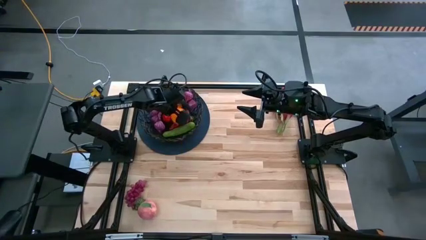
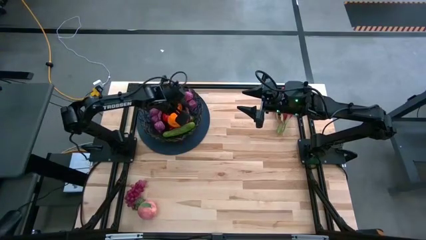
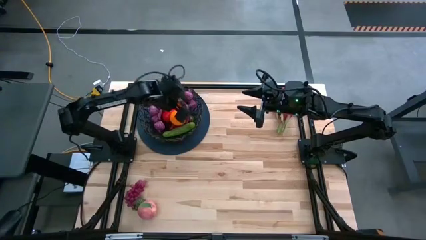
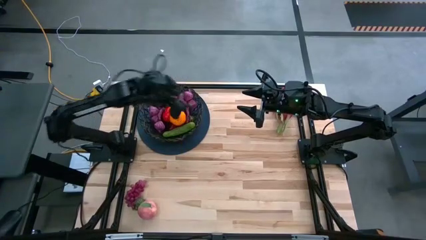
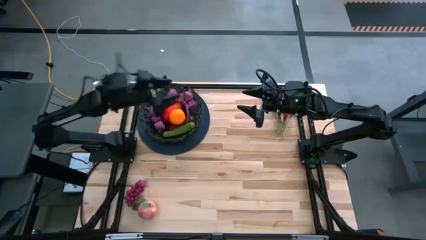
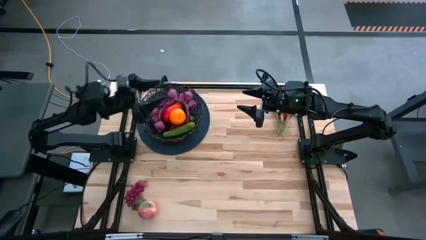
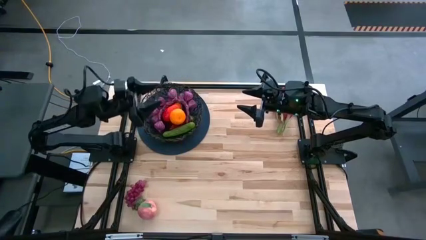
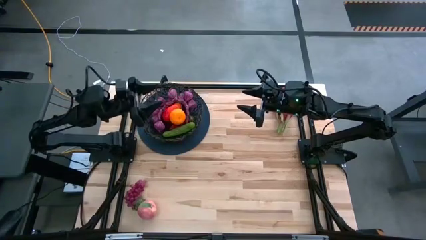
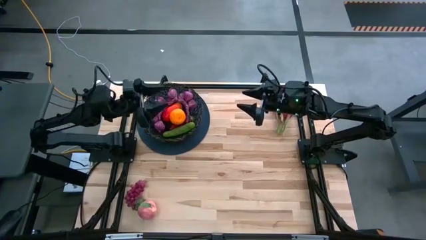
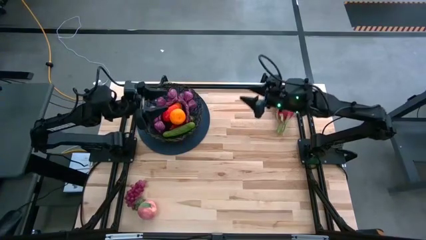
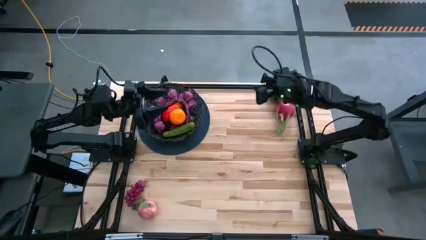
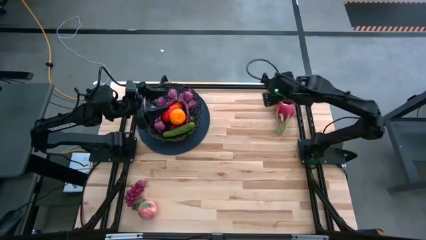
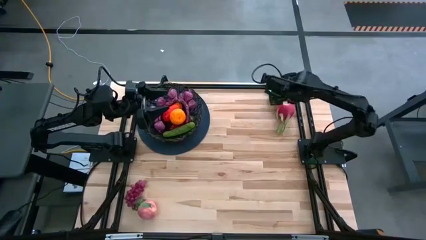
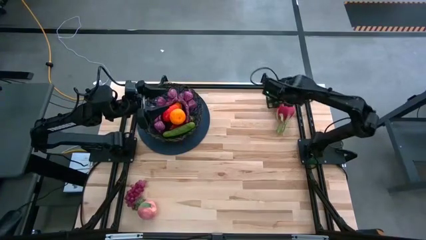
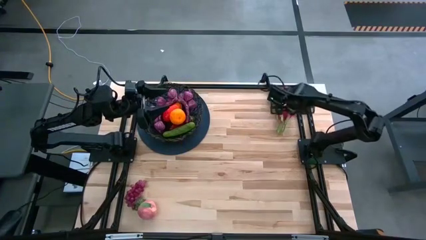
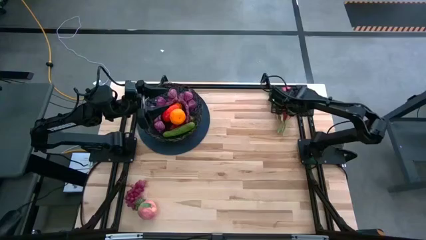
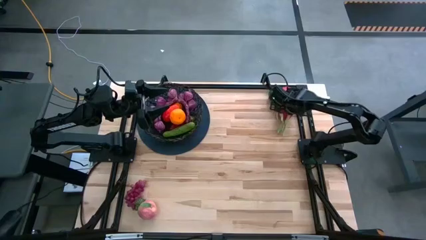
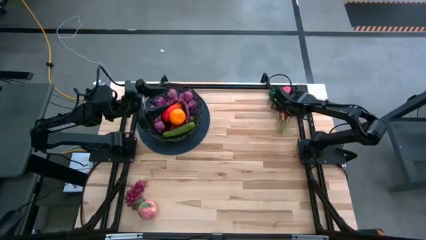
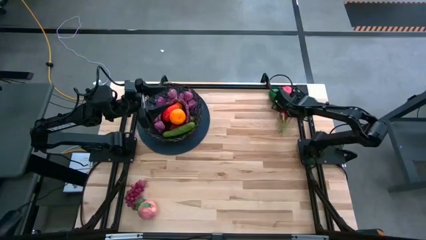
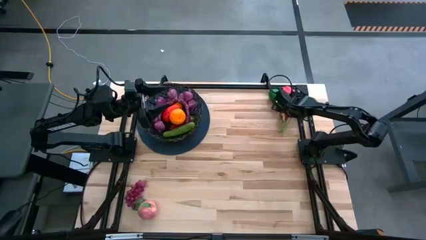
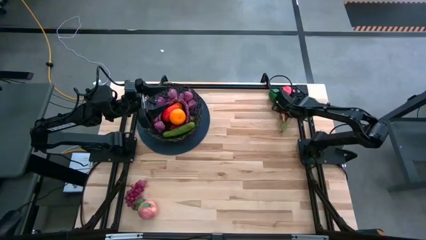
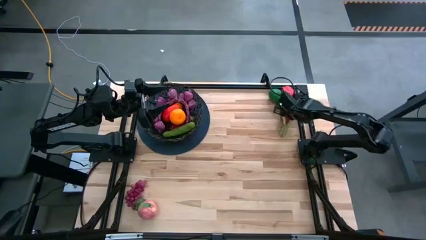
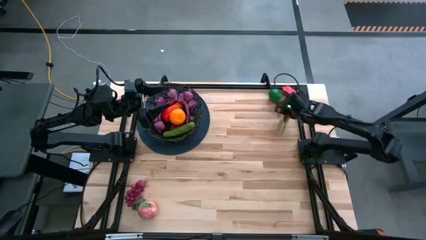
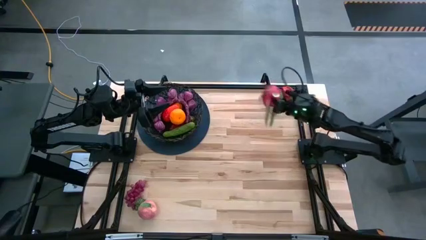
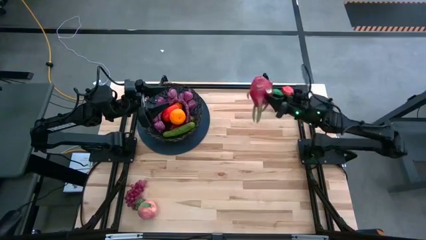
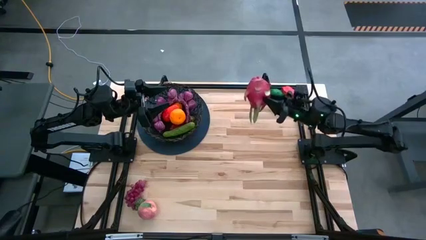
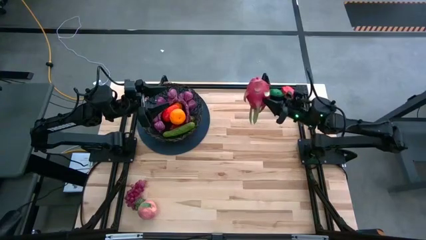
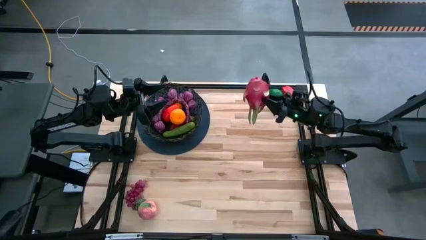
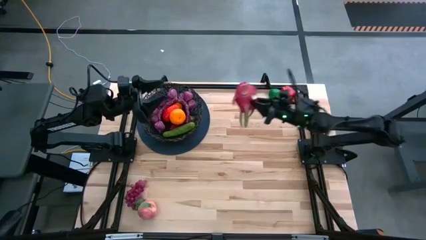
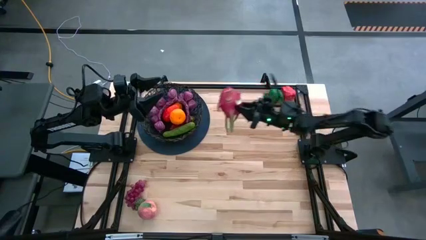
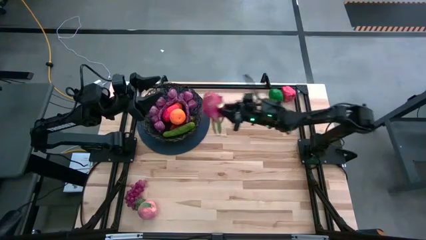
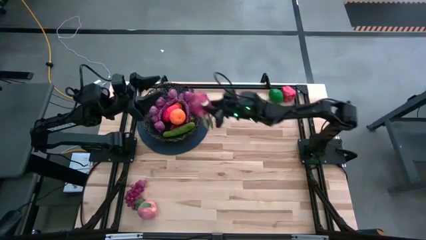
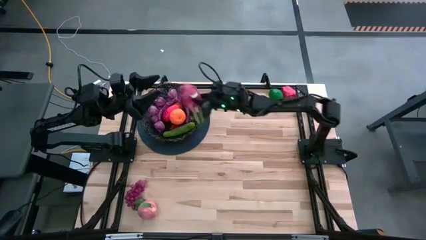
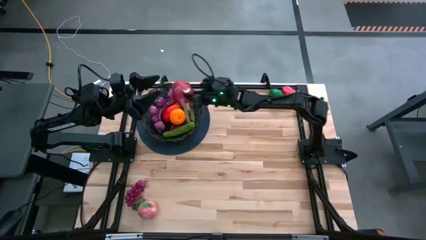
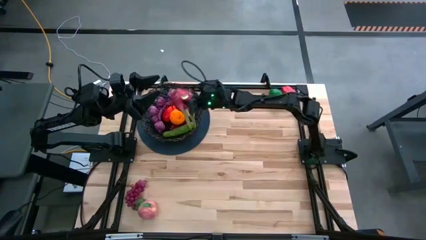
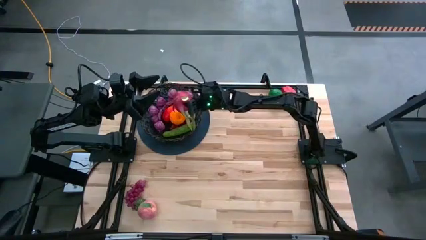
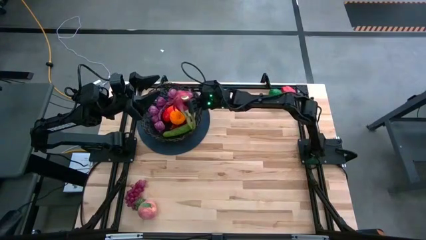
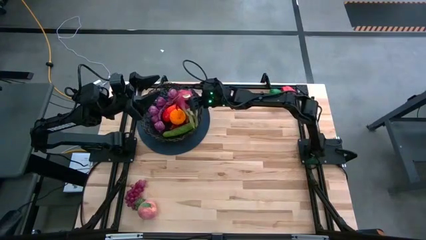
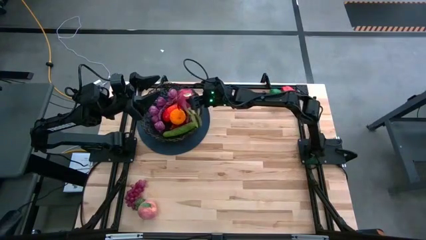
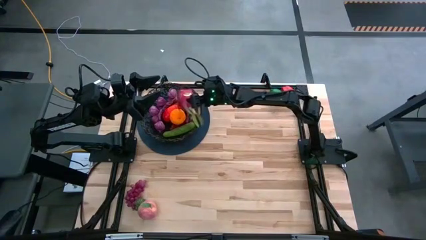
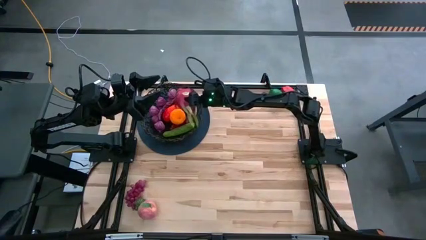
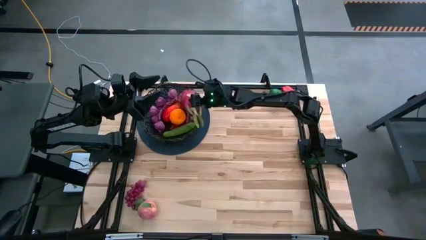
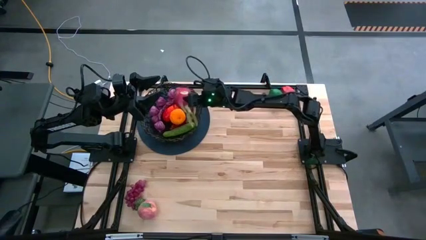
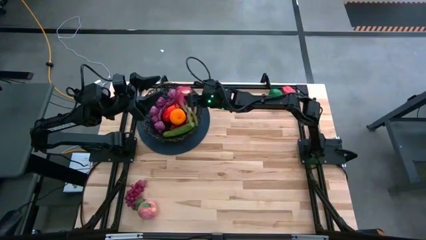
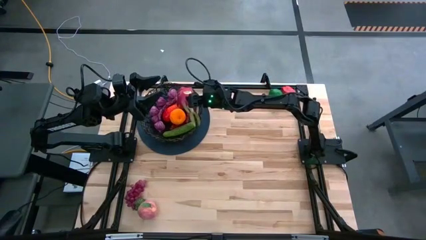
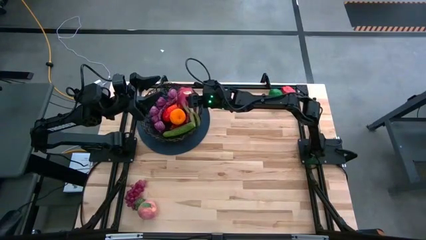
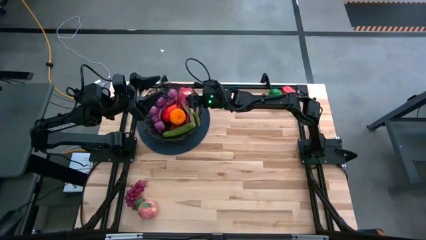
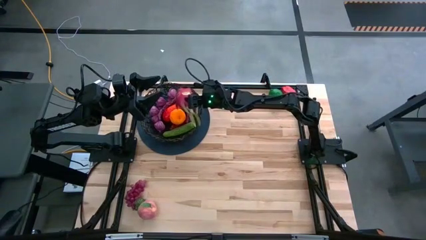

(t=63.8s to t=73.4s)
Task: Build produce basket
Put the pink dragon fruit into the black wire basket

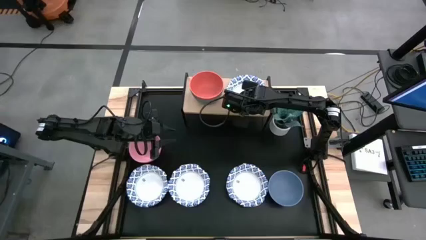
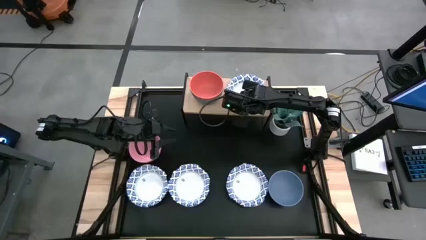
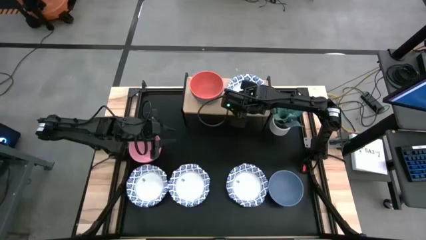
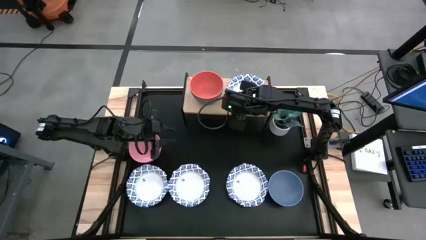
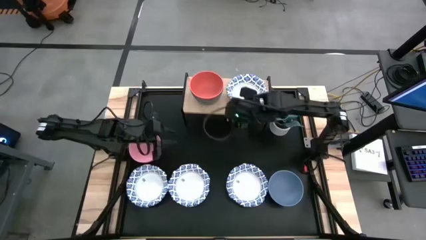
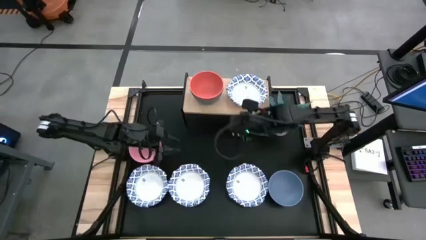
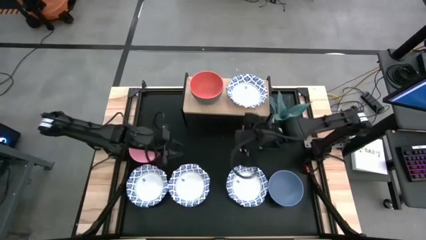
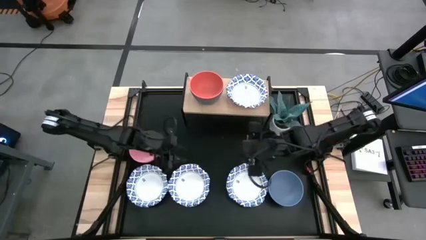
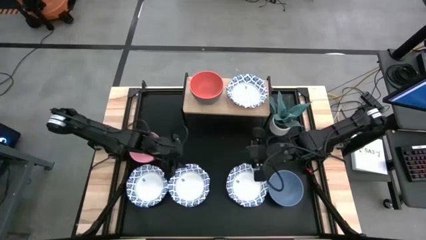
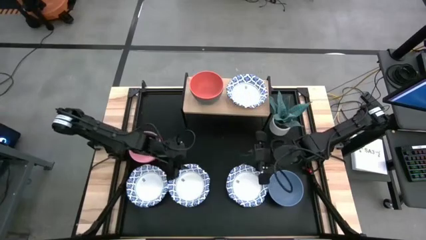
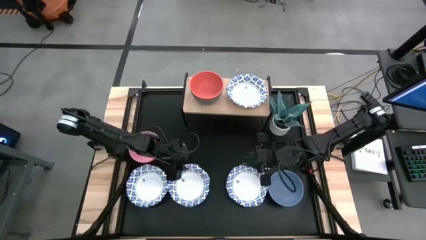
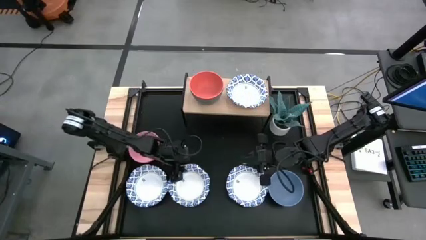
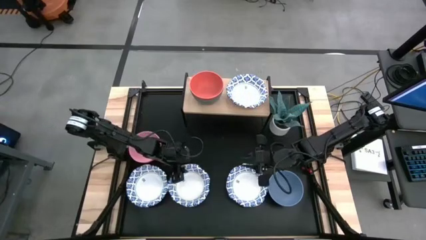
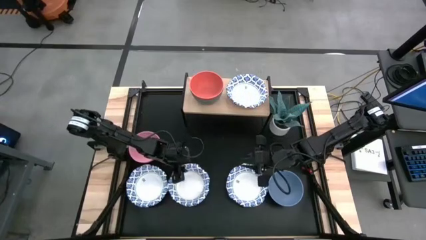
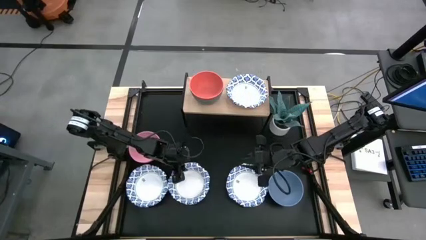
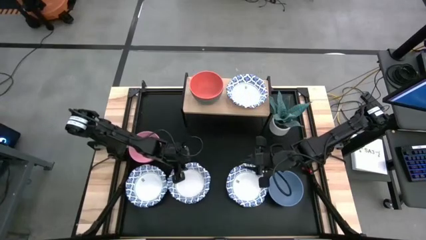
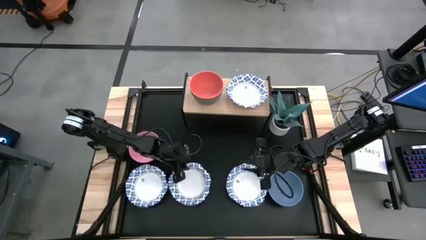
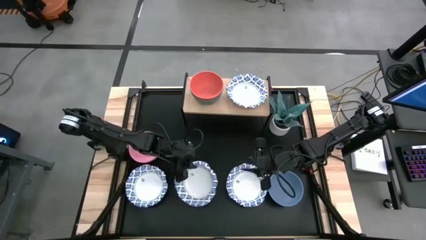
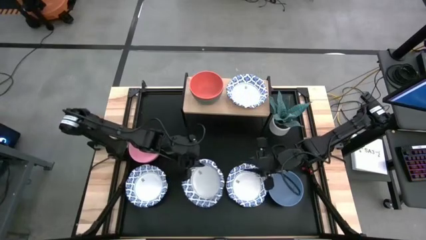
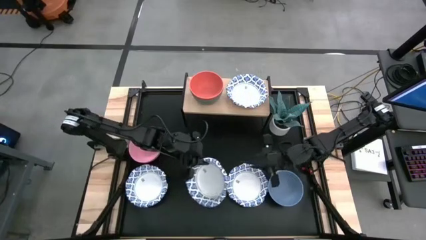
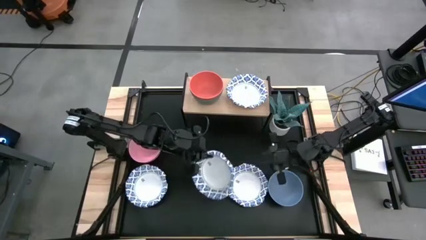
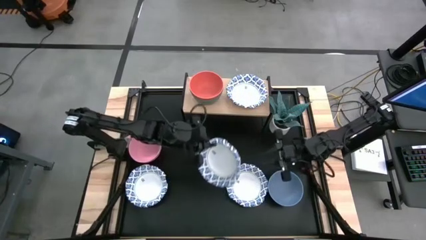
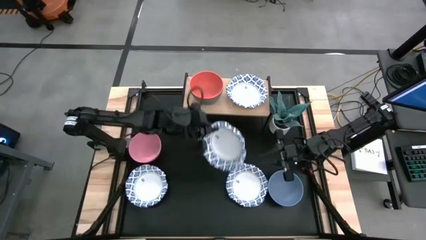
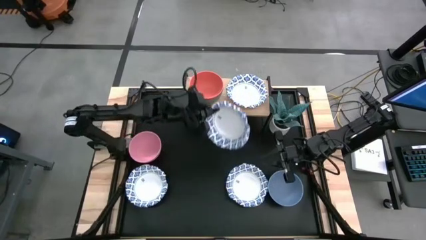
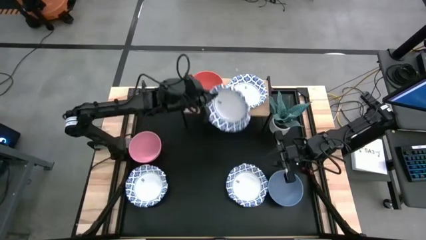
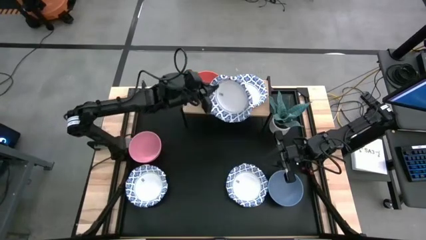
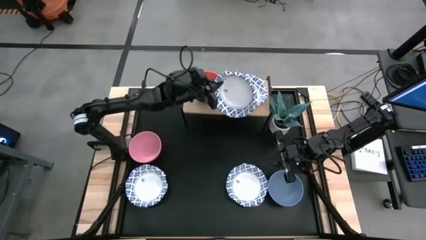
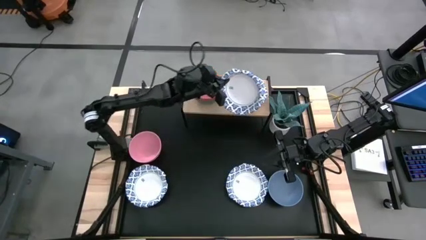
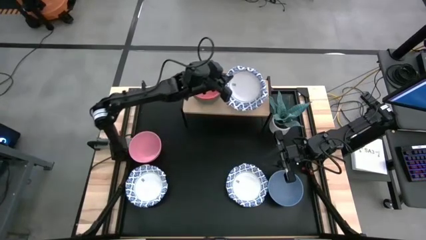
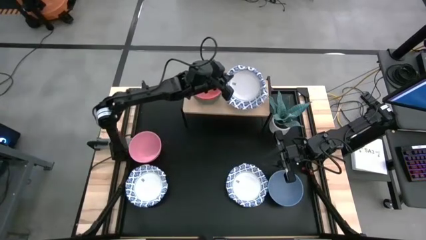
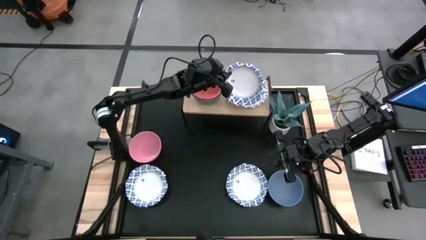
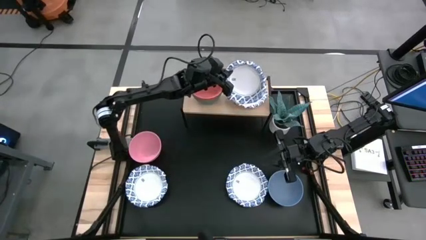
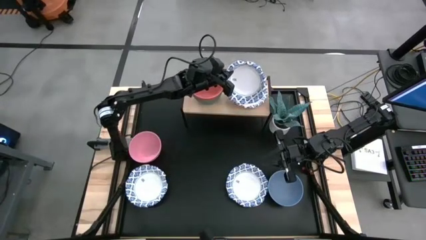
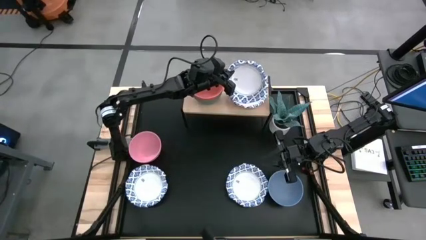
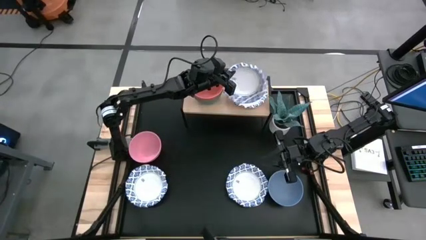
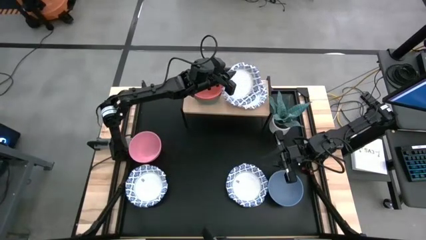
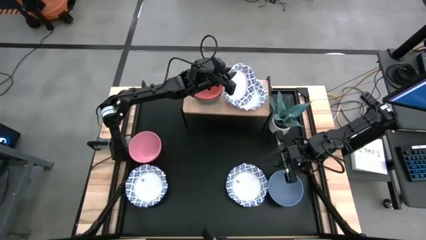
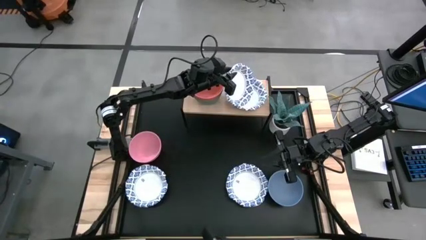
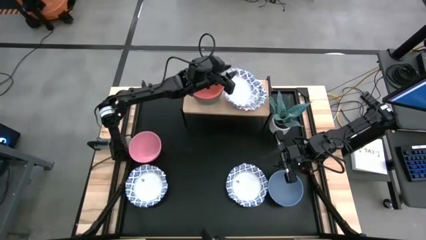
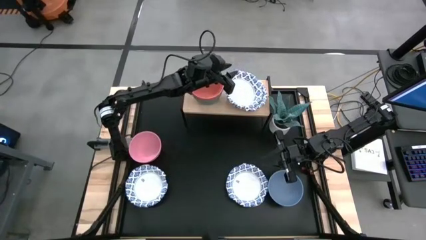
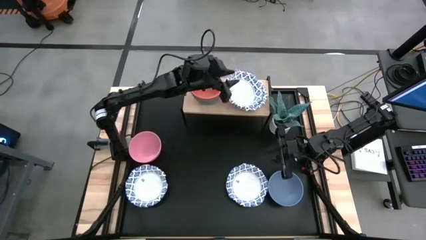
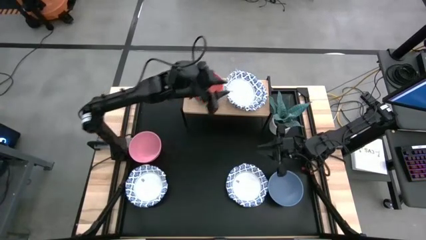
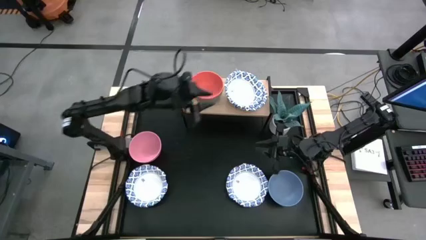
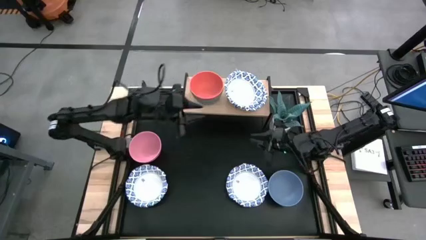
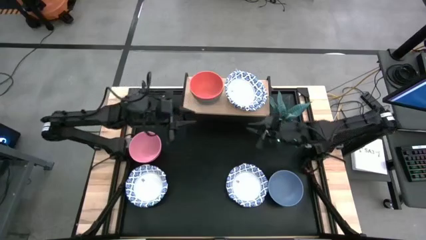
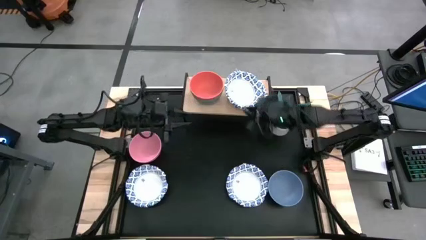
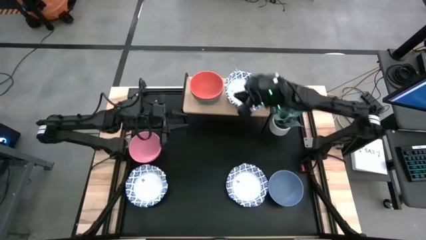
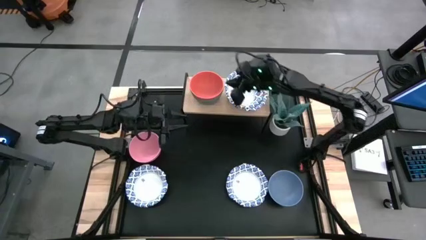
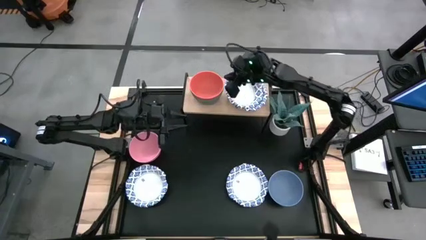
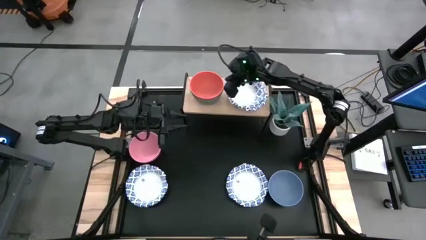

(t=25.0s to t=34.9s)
Task: Place and stack bowls onto a shelf
Stack the white with blue patterned bowl on top of the white with blue patterned bowl on the shelf
